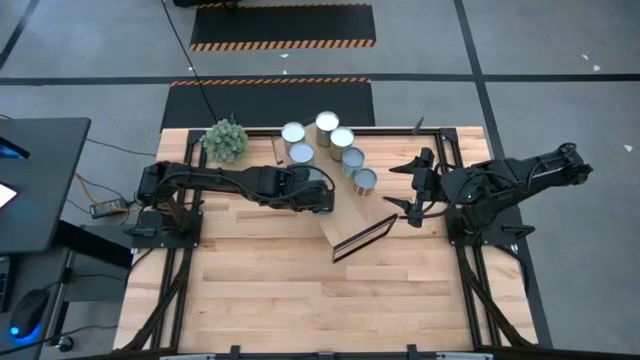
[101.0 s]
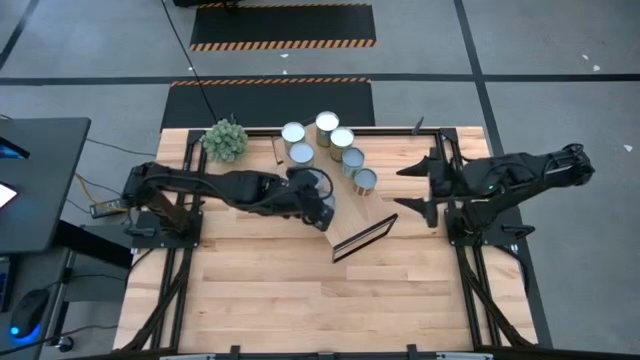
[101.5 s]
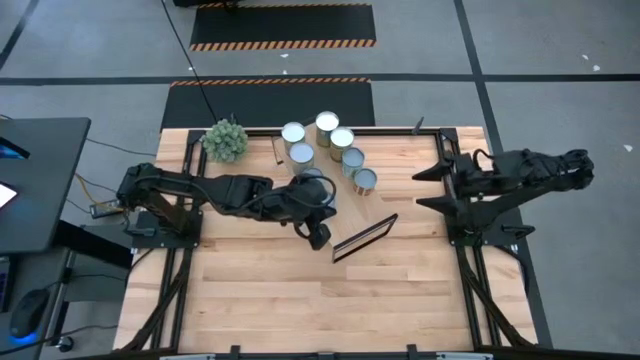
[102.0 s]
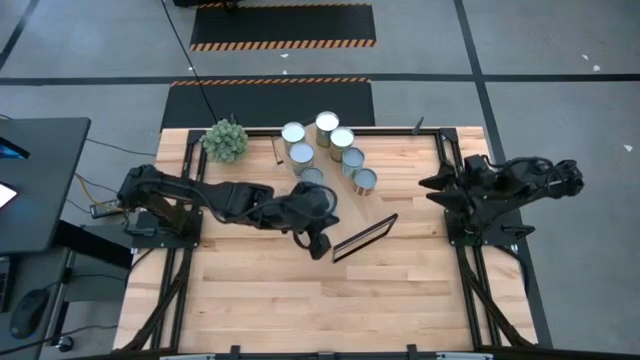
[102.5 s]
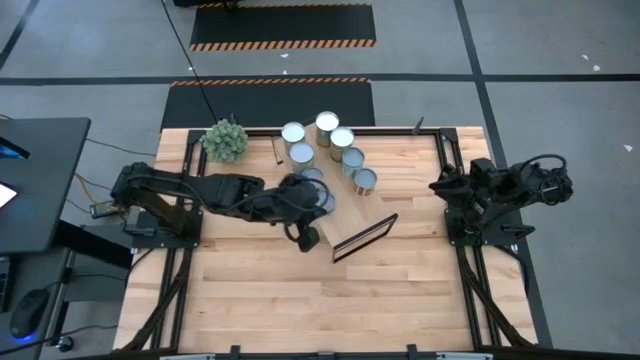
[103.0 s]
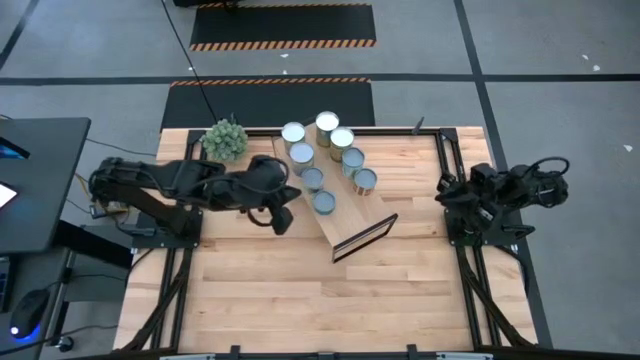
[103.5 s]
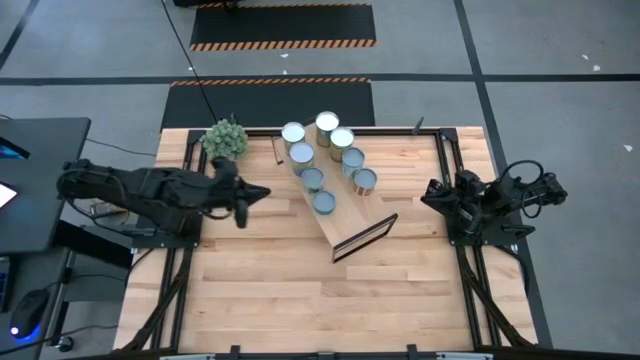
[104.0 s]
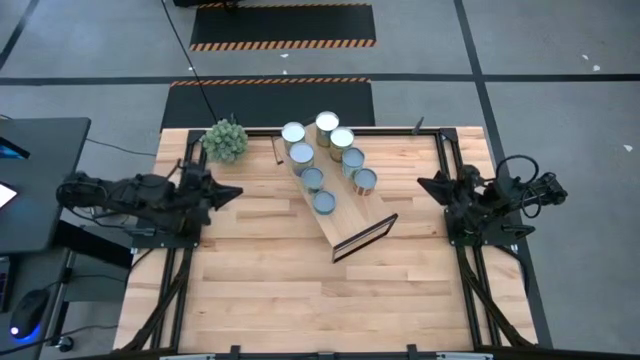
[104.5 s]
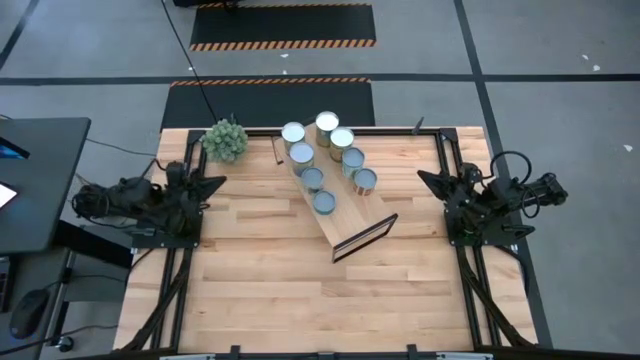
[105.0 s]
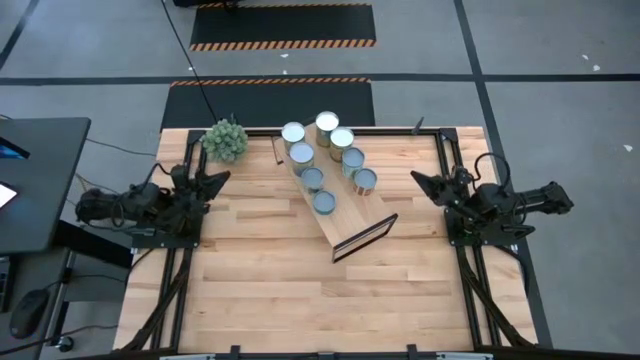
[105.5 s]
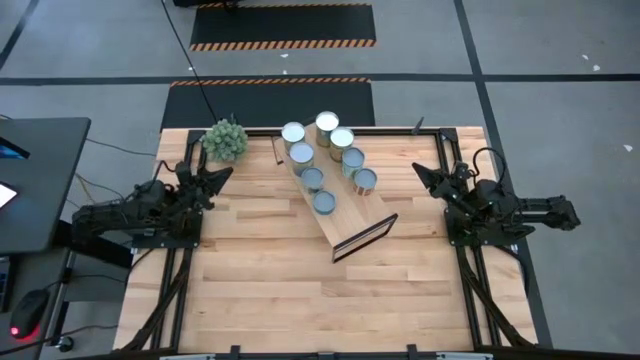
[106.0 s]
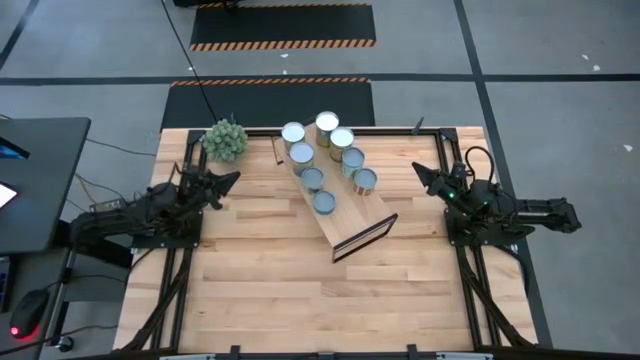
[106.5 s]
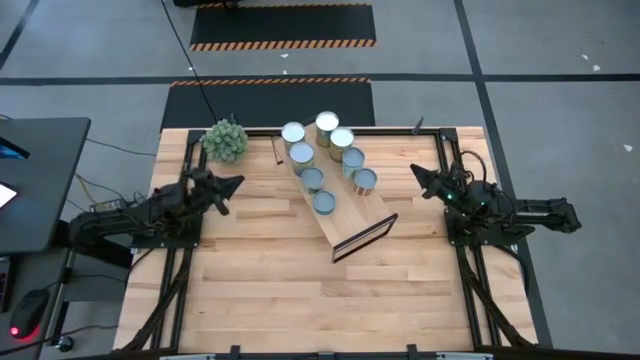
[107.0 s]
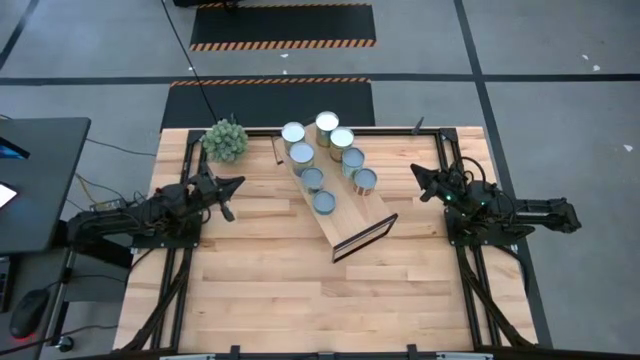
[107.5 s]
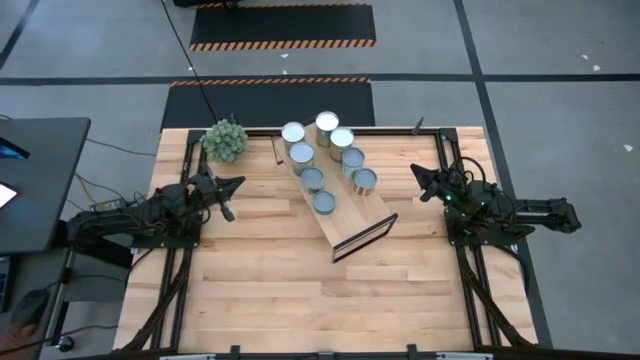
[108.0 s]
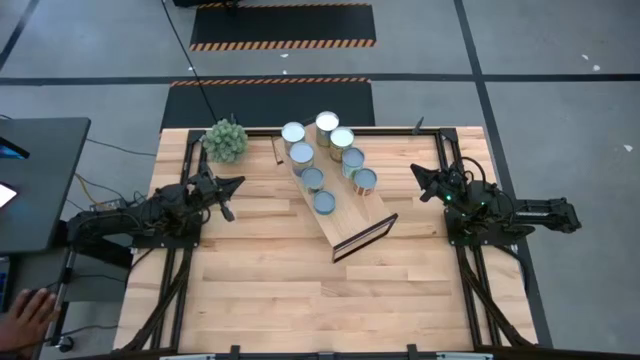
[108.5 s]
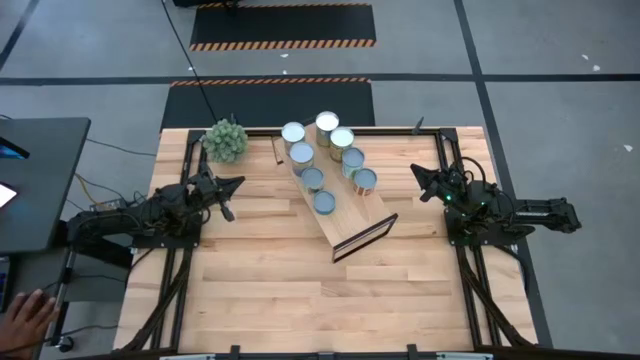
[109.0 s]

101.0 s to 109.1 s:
Task: Pick and place cans onto a shelf
Return to Home position

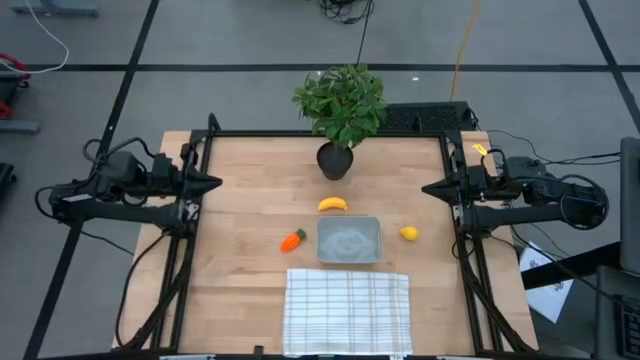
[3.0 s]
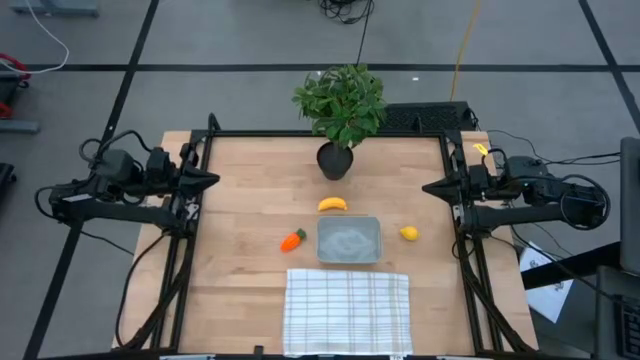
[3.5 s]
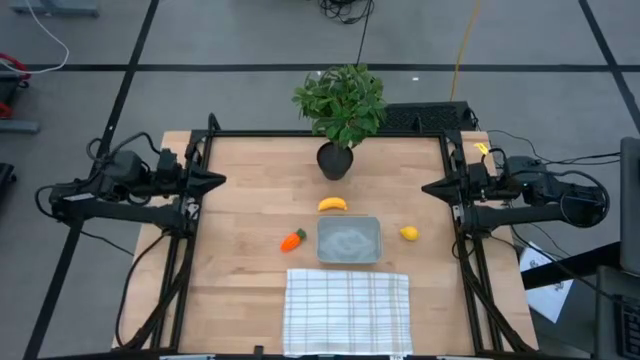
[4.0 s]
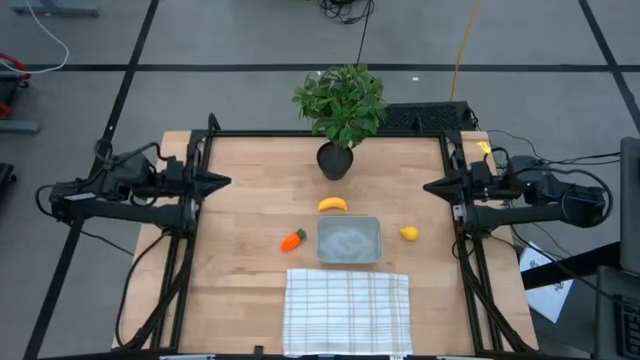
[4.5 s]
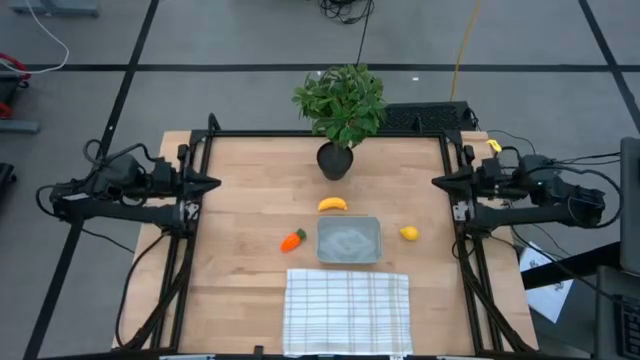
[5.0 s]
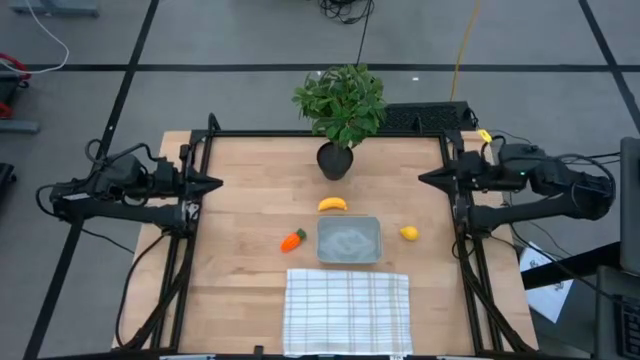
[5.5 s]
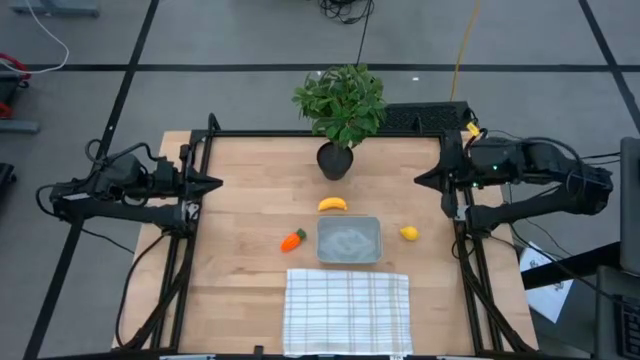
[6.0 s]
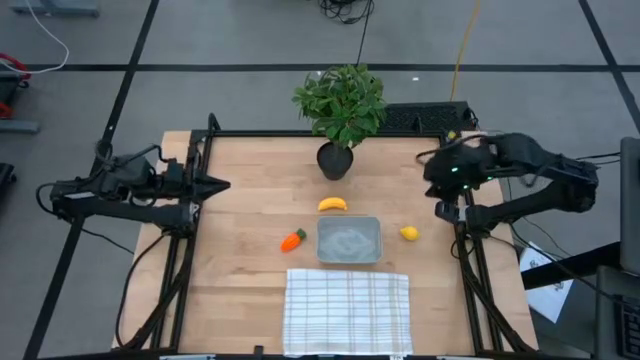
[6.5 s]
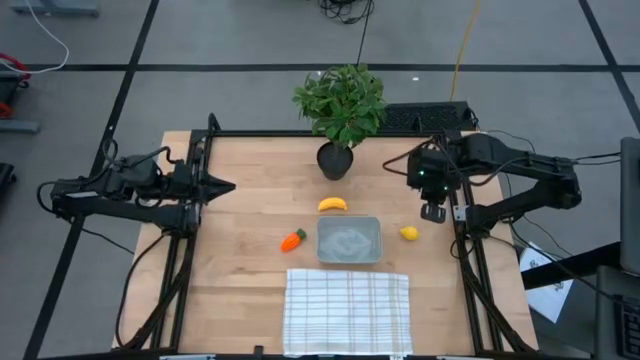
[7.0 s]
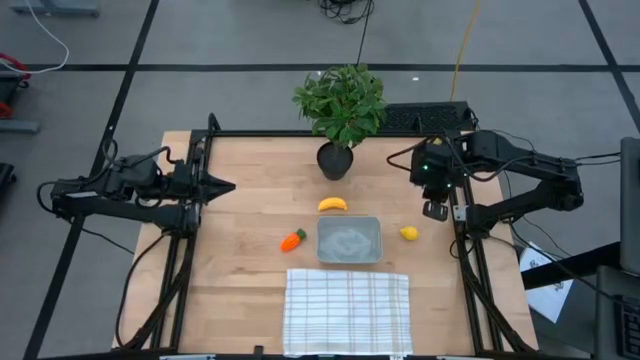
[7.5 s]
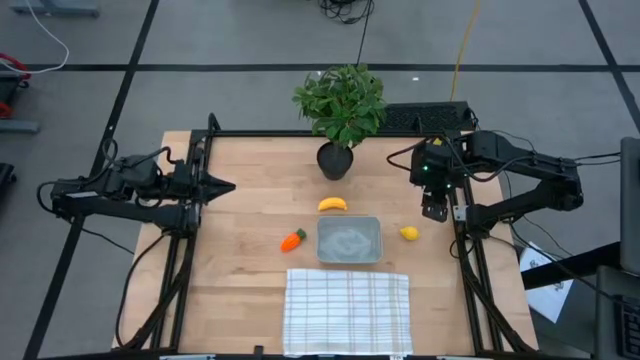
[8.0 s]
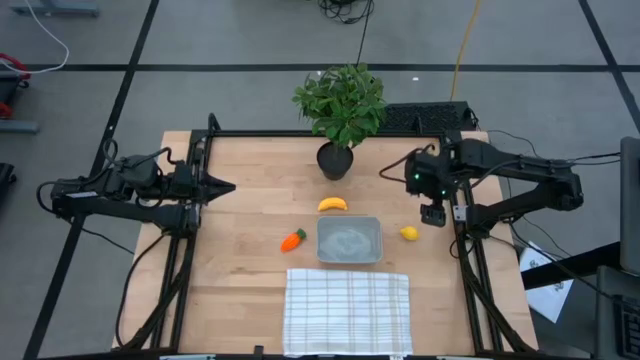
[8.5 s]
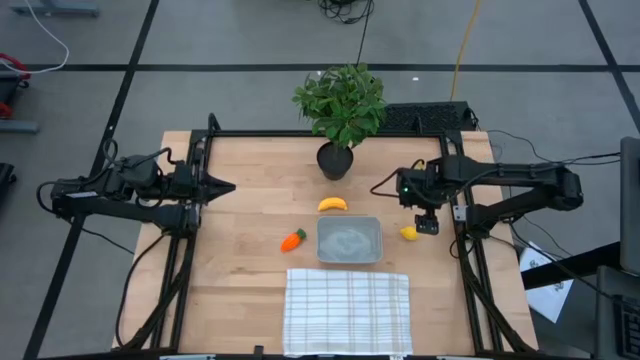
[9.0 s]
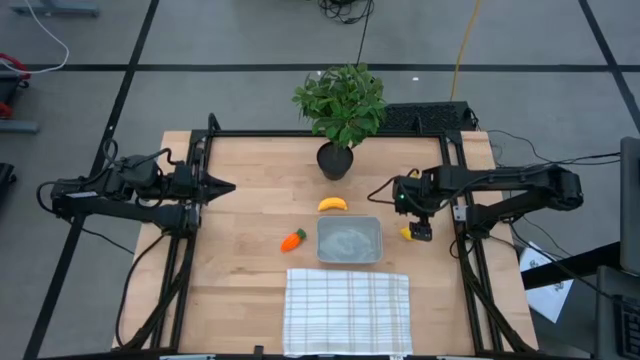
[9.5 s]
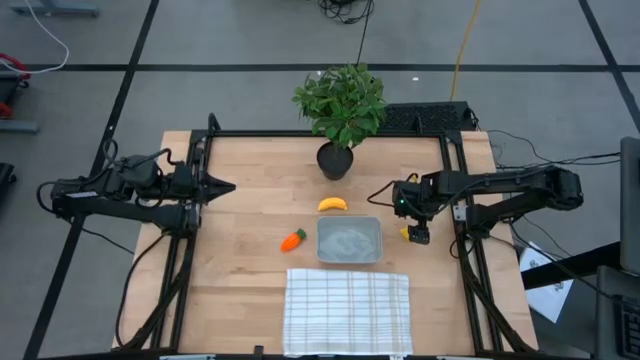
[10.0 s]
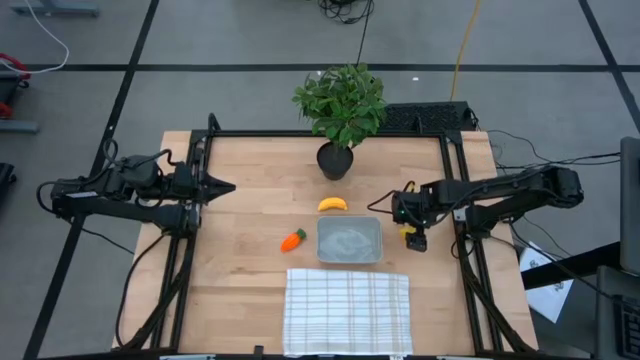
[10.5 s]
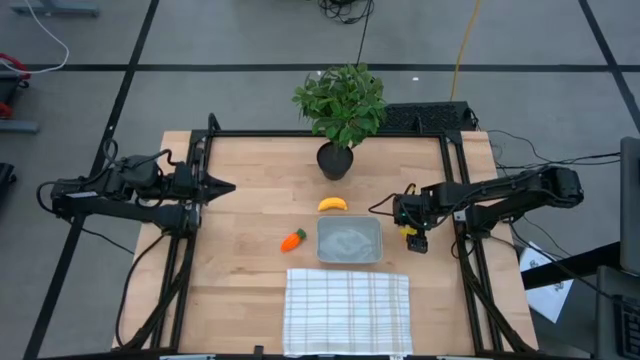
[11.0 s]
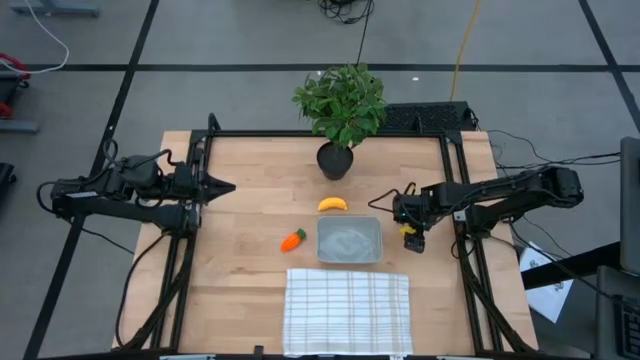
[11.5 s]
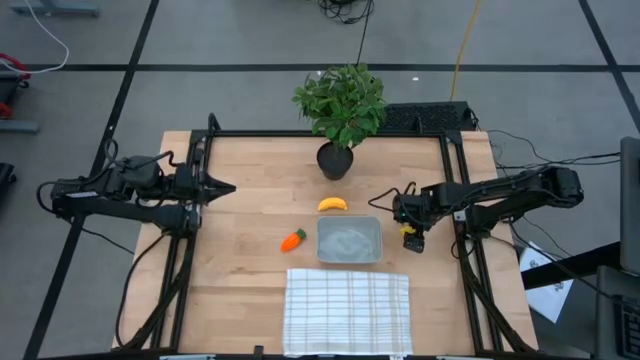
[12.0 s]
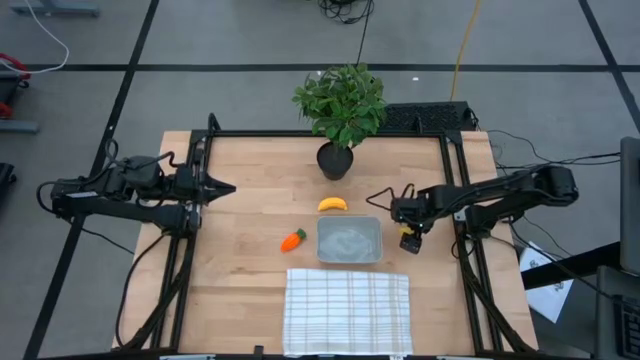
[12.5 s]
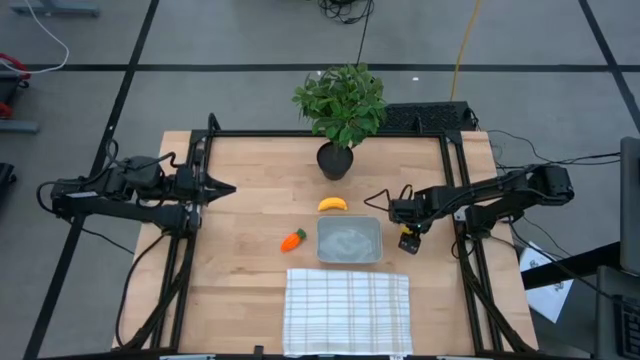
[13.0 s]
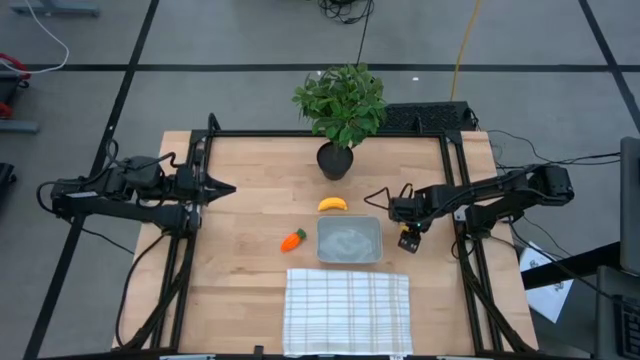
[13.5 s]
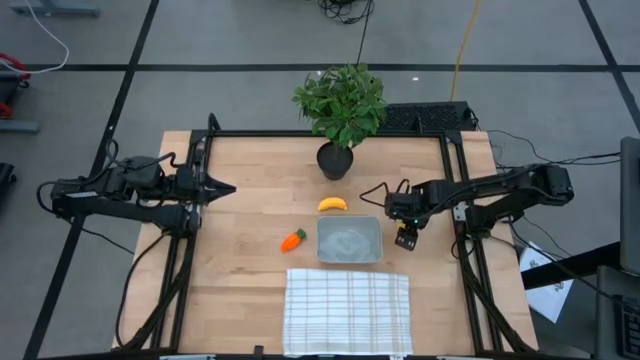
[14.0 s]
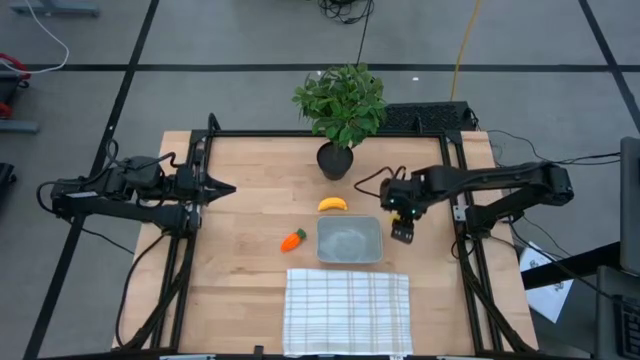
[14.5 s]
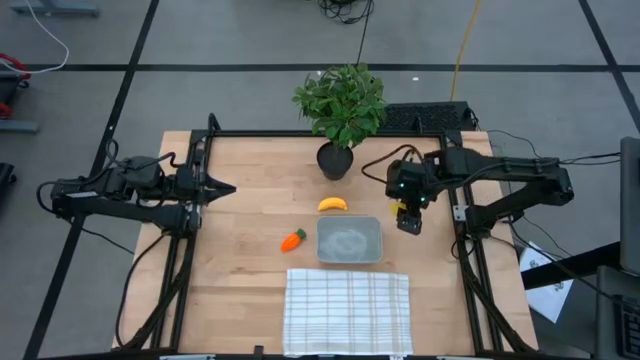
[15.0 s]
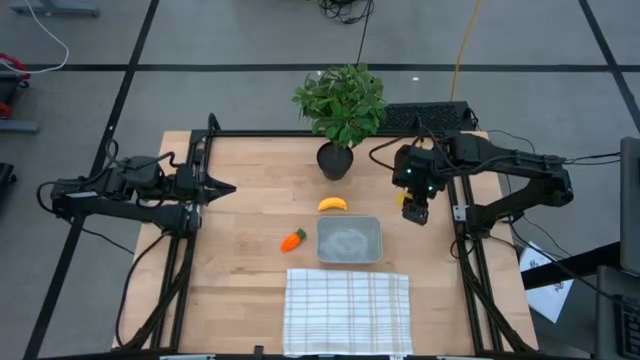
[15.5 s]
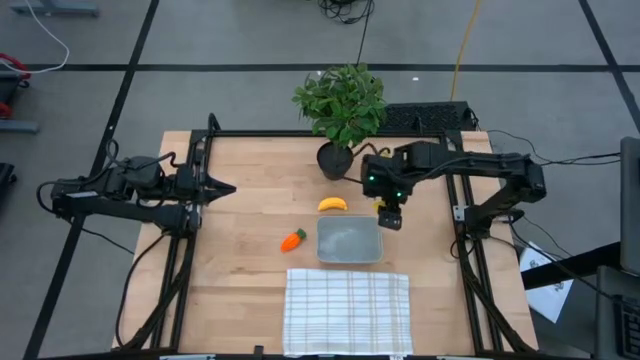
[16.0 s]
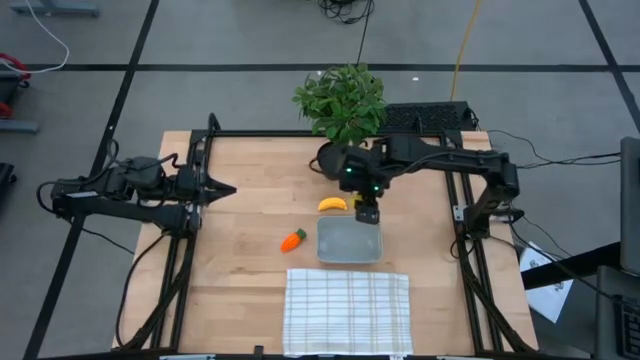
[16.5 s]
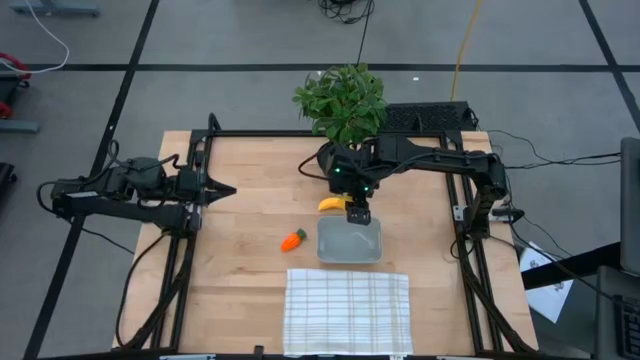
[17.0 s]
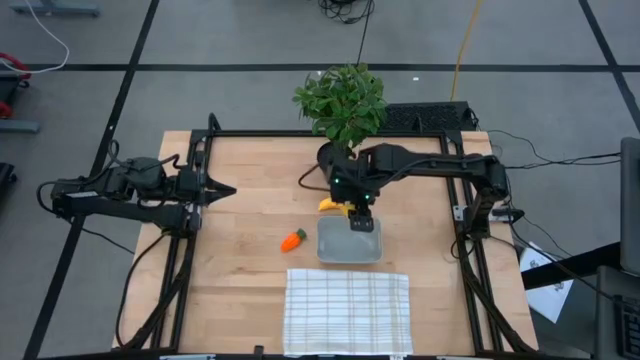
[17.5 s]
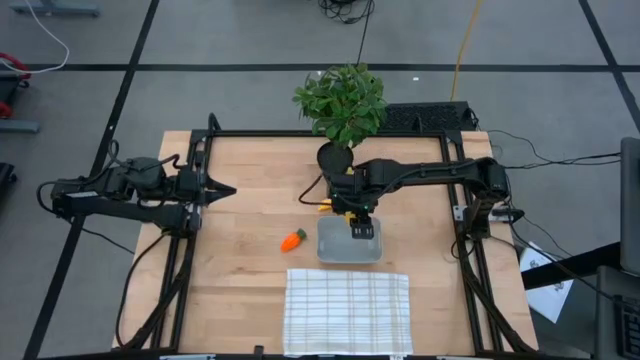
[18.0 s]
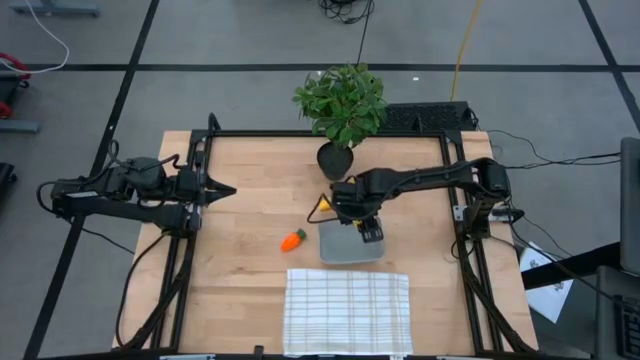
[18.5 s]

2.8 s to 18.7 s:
Task: Pick and placing Produce into tupperware
Put the yellow lemon into the gray bin
